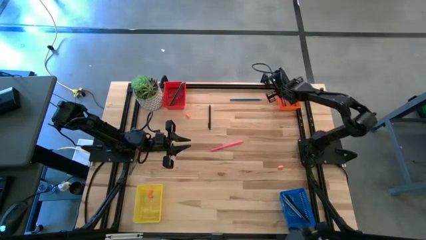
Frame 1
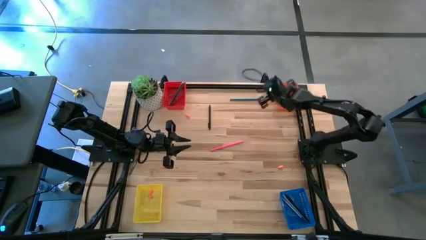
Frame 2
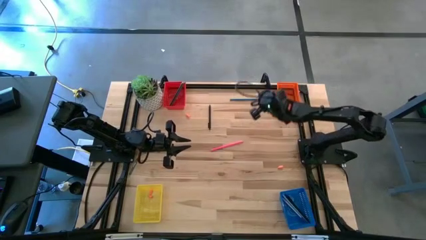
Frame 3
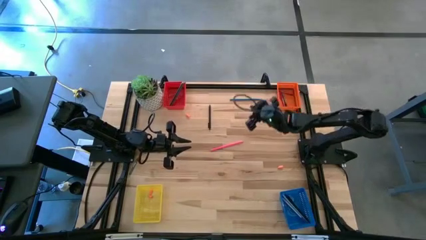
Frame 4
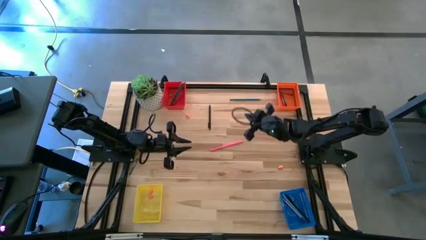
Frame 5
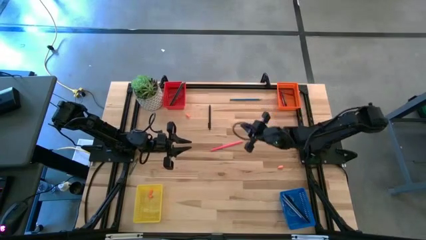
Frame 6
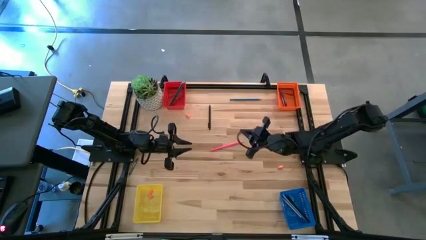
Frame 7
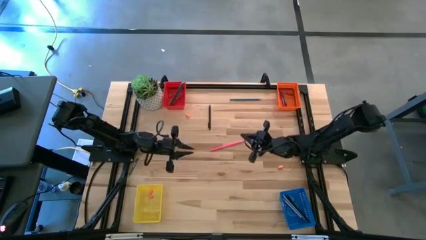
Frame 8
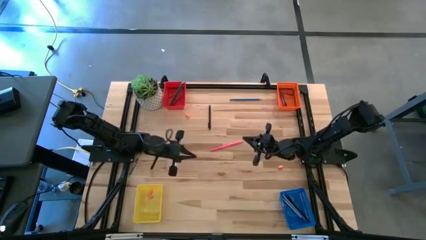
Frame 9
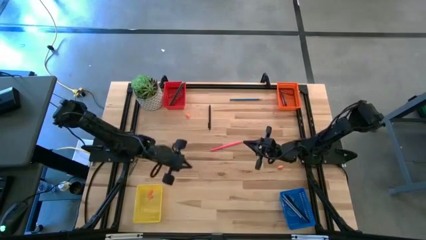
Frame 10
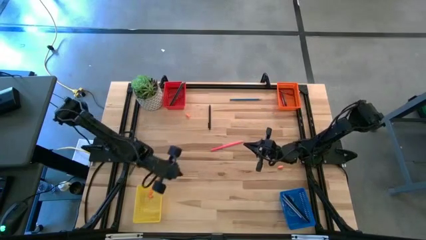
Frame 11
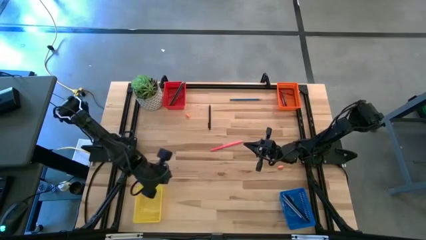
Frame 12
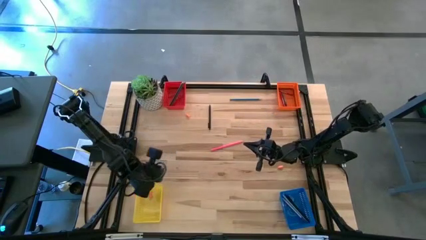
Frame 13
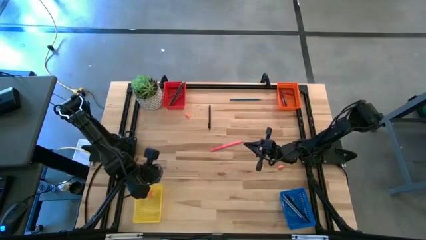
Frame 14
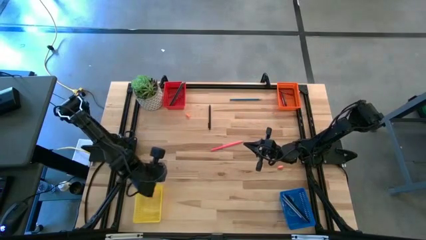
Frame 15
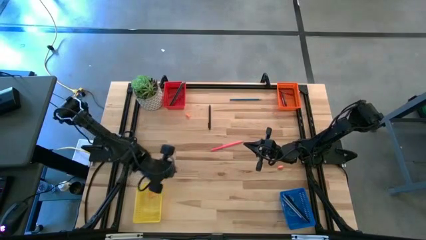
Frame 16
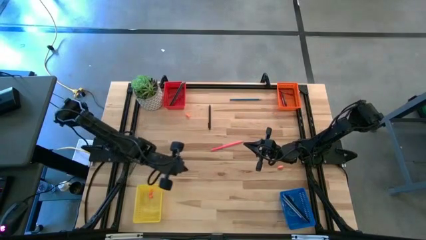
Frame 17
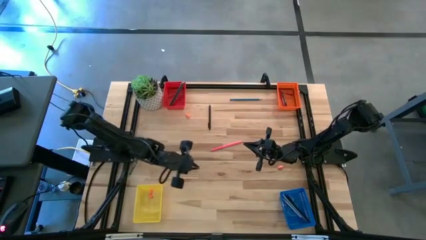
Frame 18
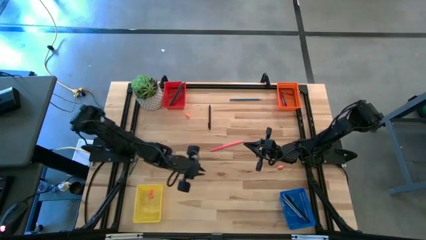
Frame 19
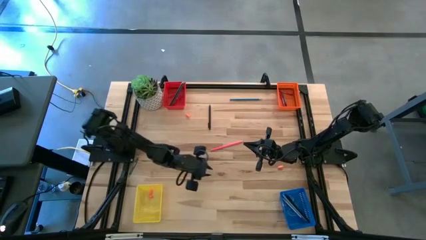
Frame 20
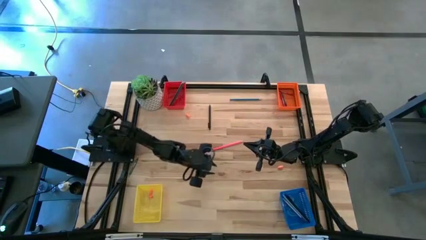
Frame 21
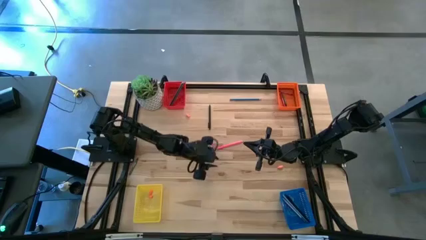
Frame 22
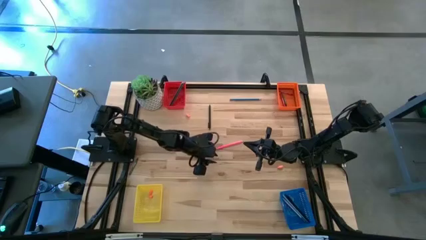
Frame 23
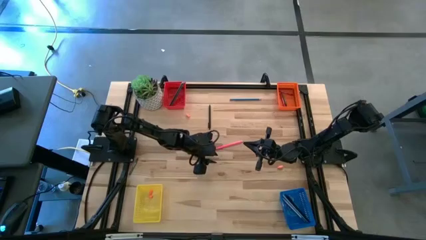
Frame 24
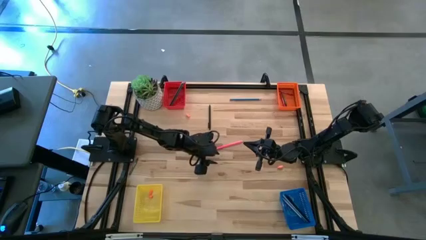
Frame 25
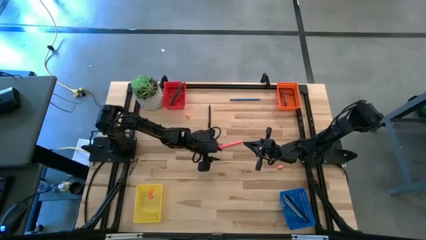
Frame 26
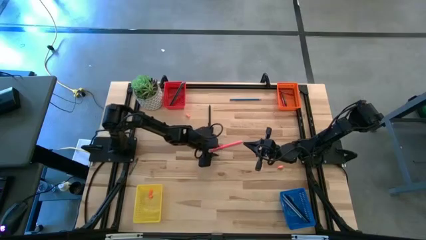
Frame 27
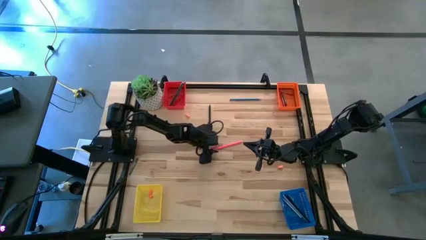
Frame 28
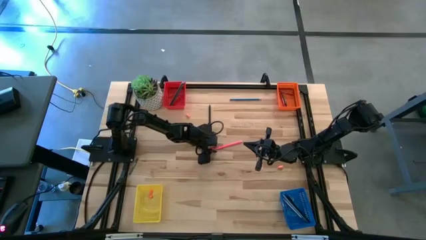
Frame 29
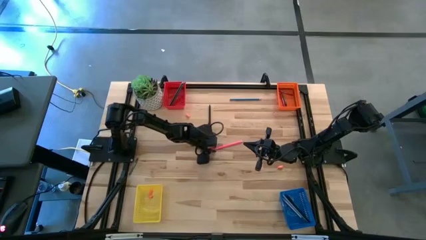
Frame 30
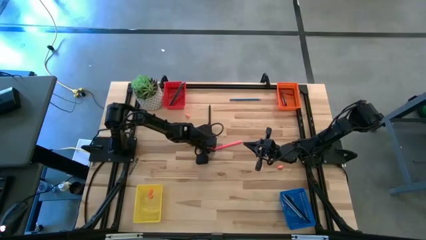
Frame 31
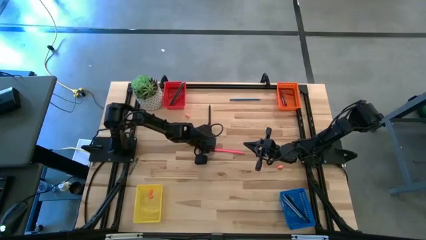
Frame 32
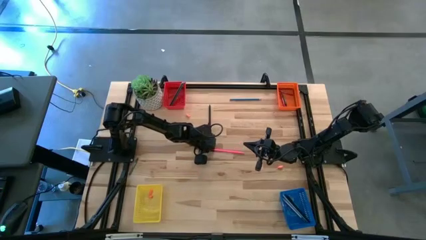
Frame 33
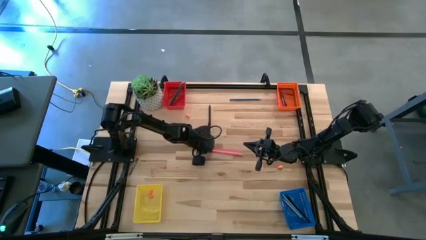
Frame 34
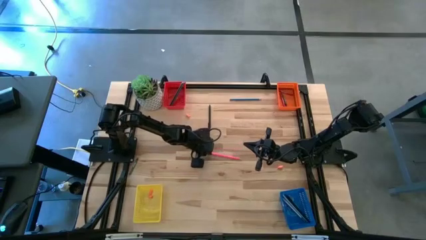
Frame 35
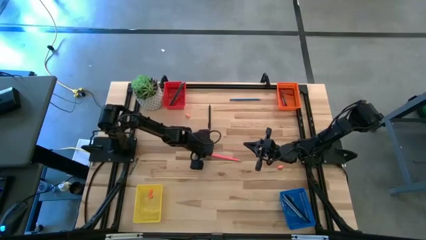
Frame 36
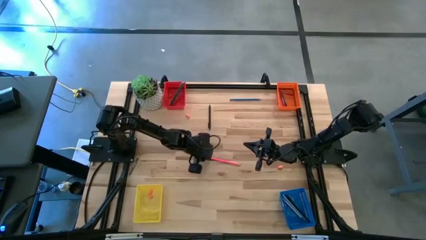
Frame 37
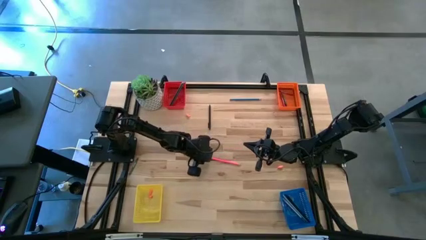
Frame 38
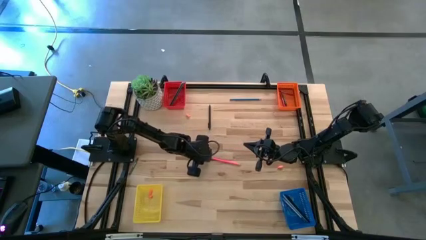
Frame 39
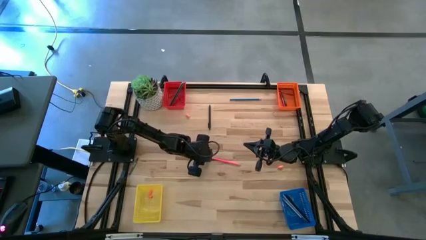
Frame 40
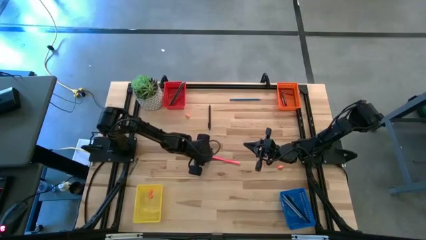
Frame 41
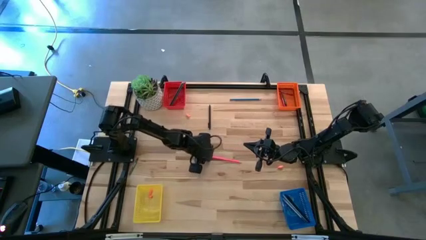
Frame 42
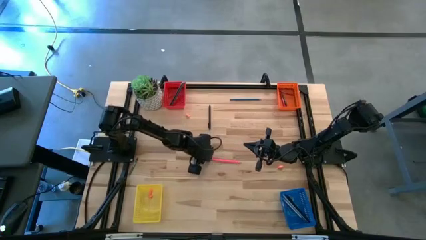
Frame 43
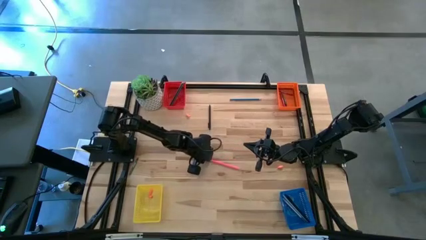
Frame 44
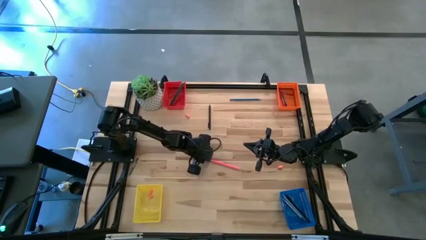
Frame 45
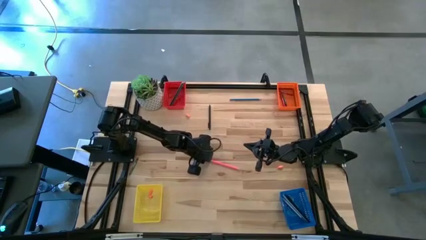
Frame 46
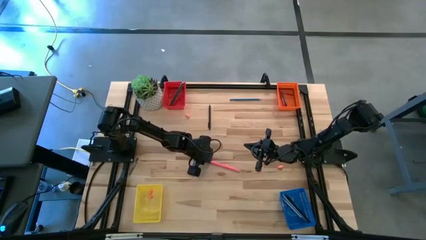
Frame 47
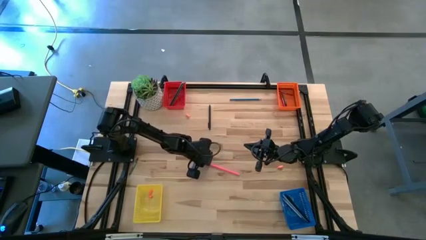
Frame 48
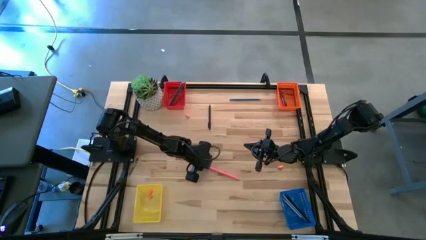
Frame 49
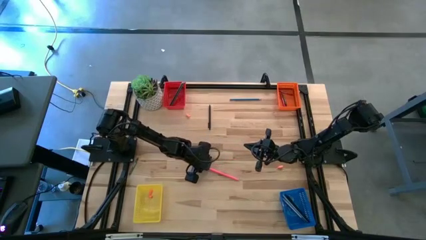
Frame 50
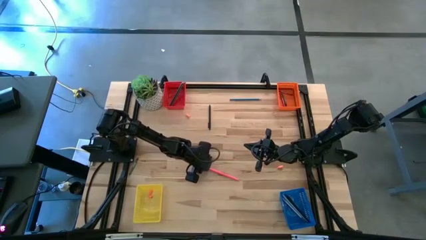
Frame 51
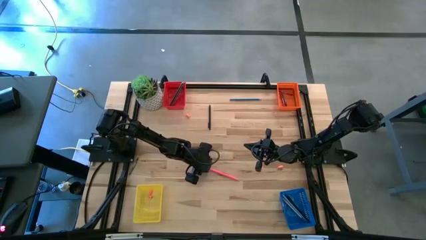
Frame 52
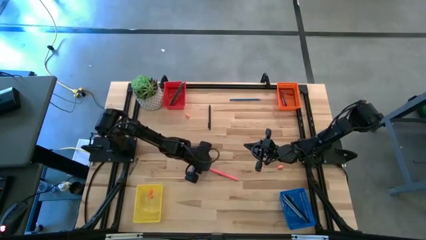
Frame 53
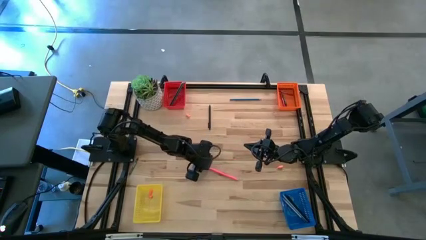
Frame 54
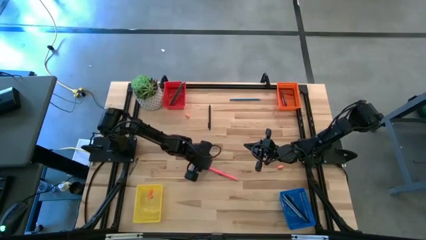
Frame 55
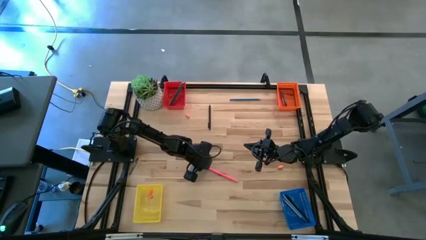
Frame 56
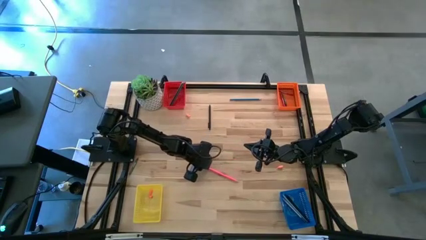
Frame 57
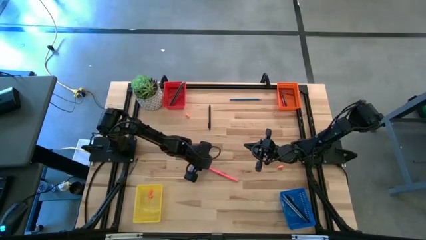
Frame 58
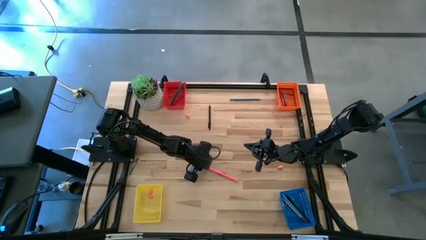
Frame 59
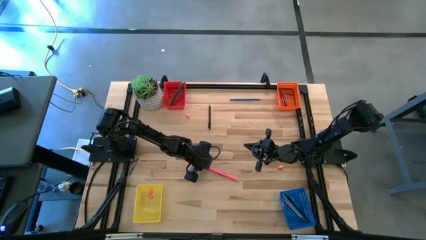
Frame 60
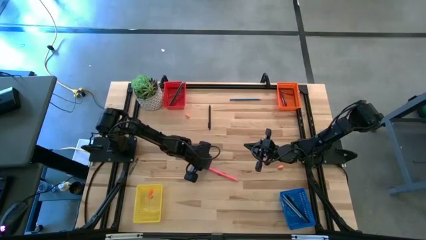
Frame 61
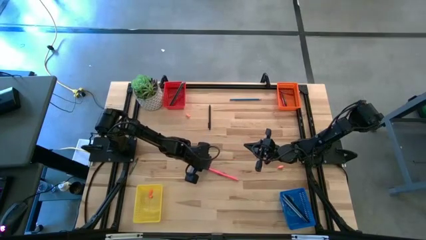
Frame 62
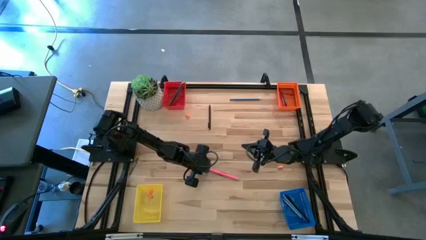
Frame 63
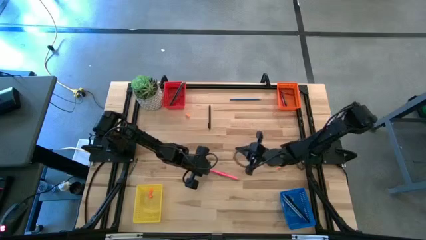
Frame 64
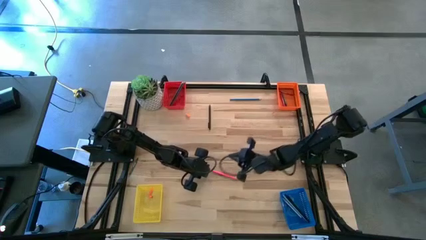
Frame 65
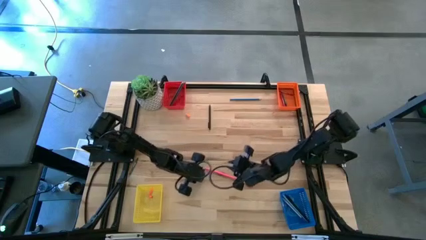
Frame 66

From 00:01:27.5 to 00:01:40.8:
Task: Sort crayons/erasers/pens/pencils in bins
Put the pink pencil into the red bin
